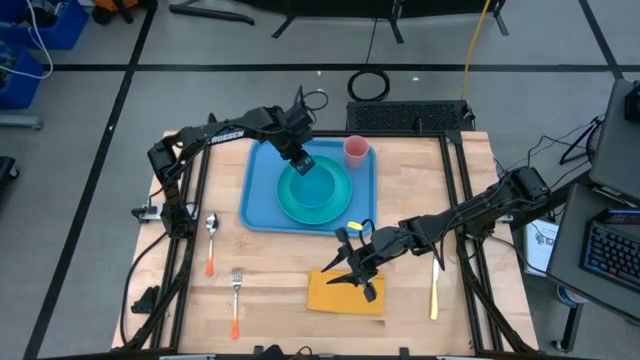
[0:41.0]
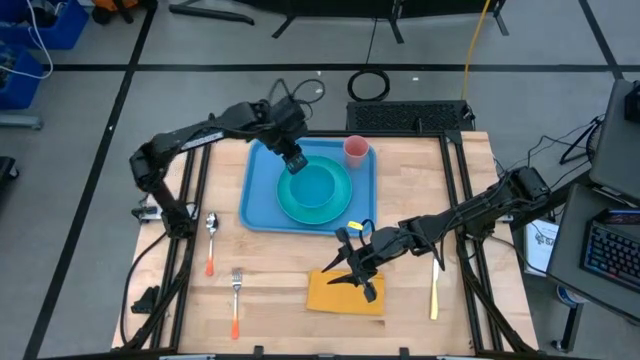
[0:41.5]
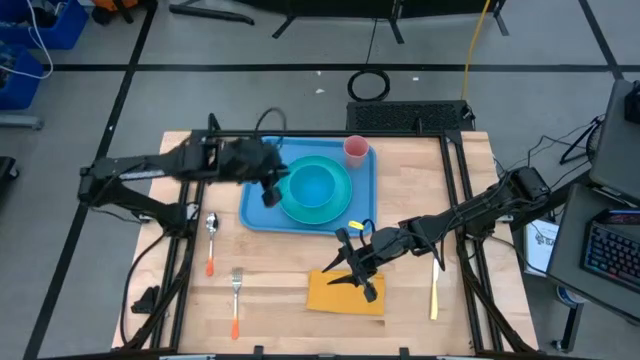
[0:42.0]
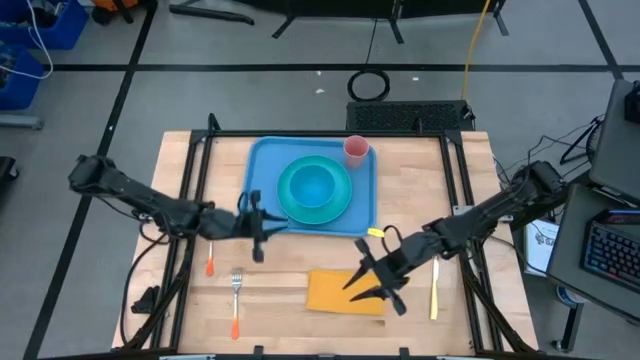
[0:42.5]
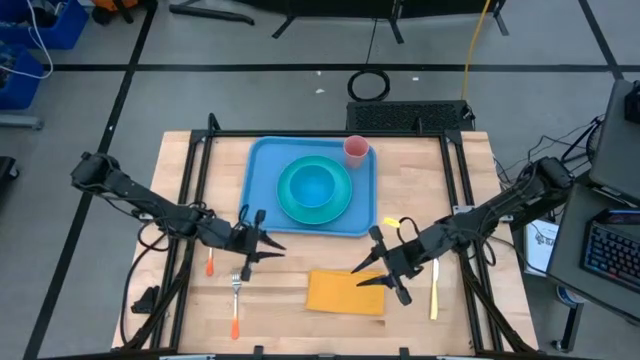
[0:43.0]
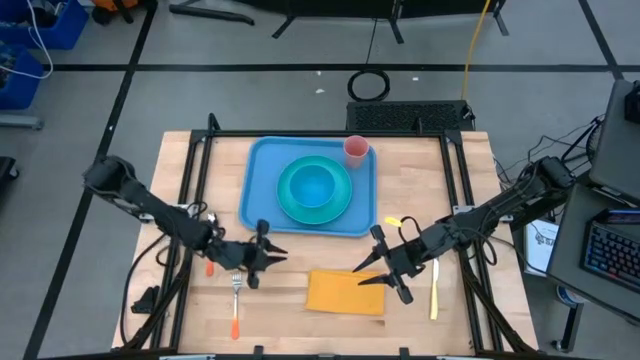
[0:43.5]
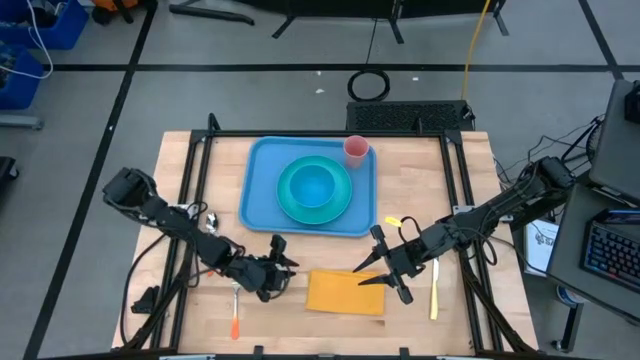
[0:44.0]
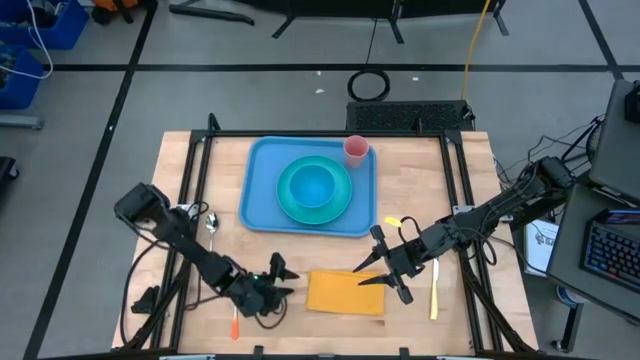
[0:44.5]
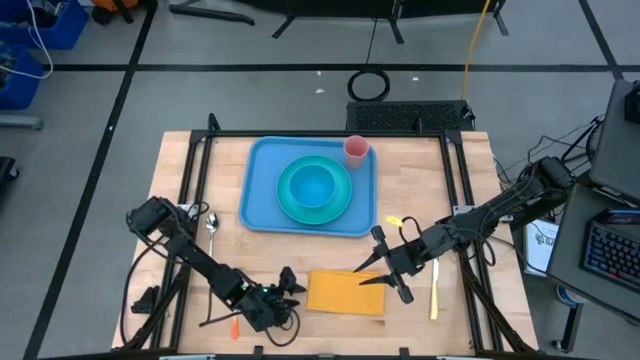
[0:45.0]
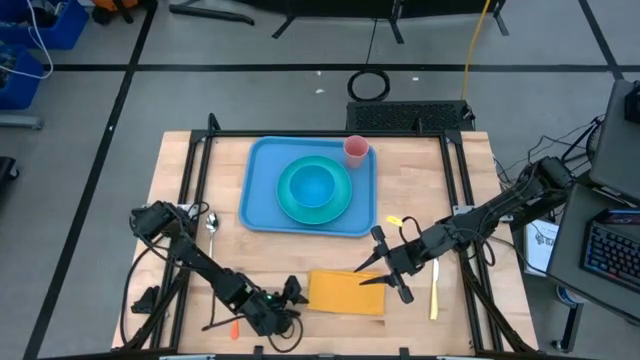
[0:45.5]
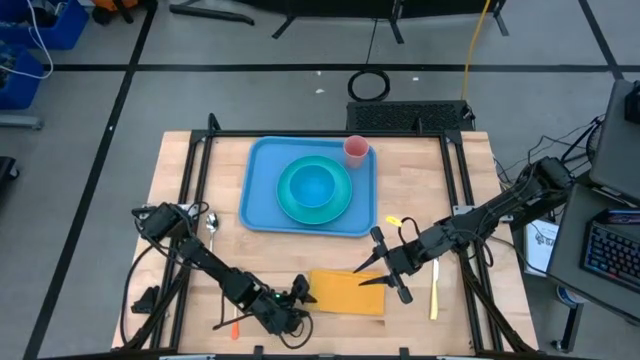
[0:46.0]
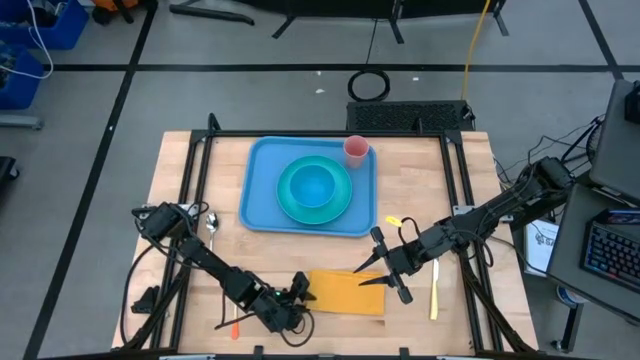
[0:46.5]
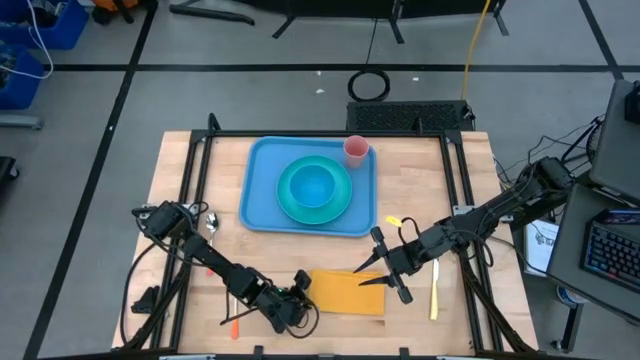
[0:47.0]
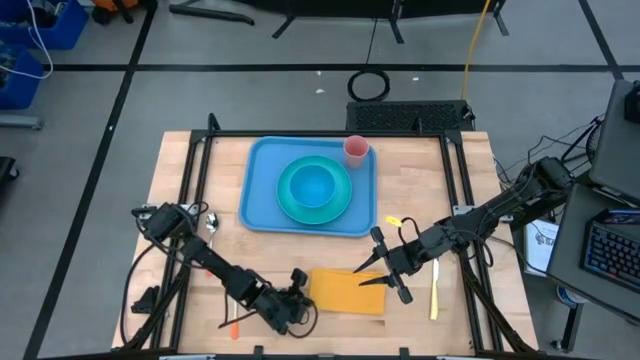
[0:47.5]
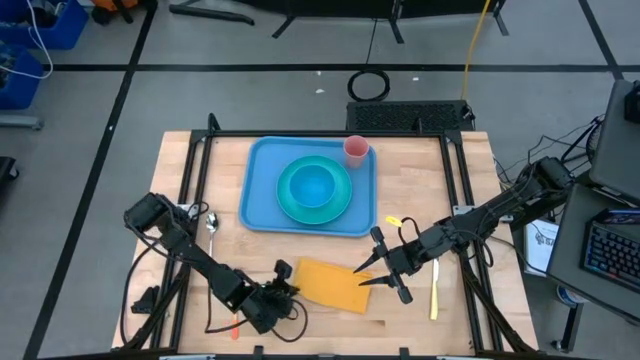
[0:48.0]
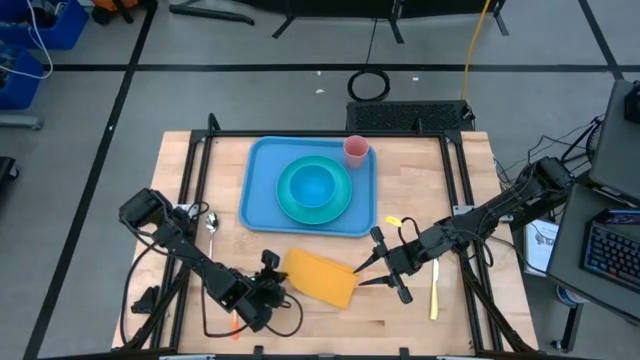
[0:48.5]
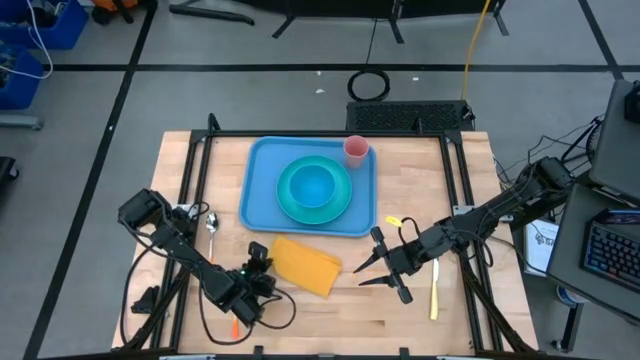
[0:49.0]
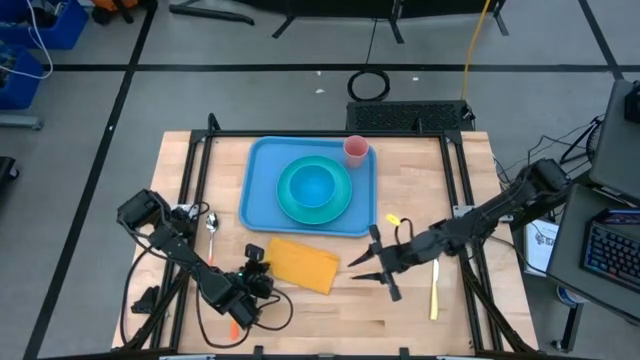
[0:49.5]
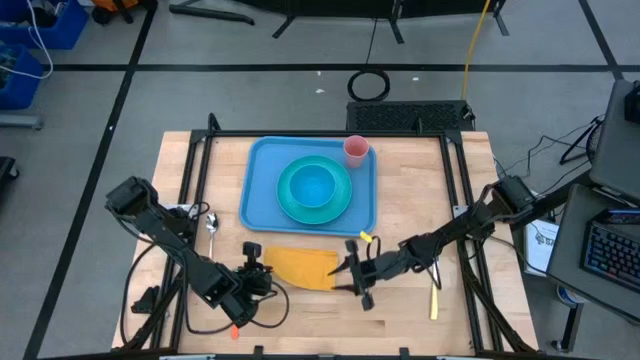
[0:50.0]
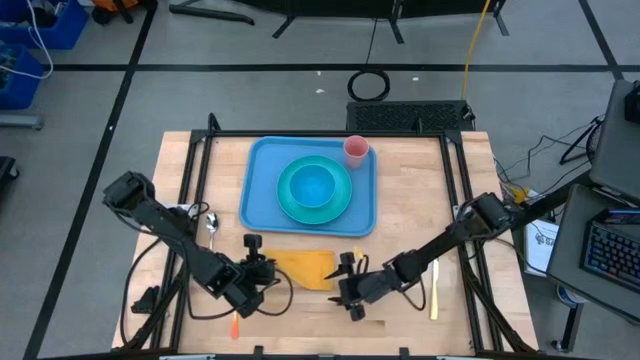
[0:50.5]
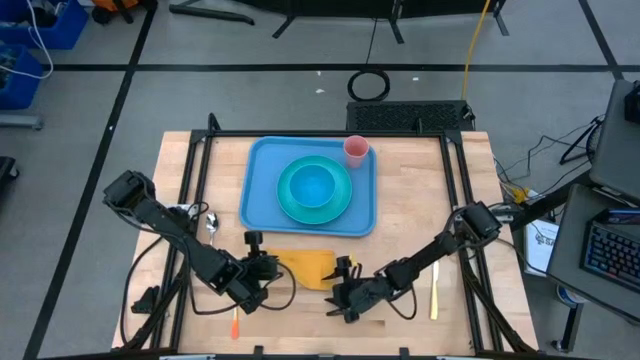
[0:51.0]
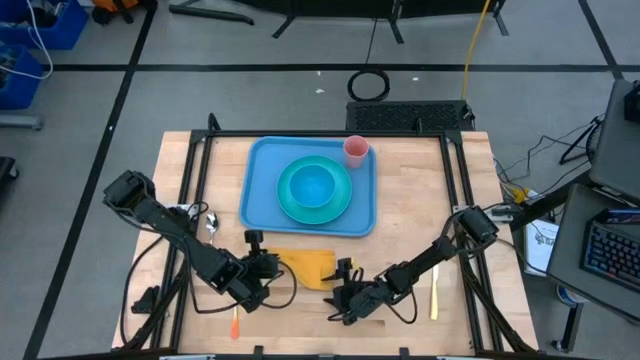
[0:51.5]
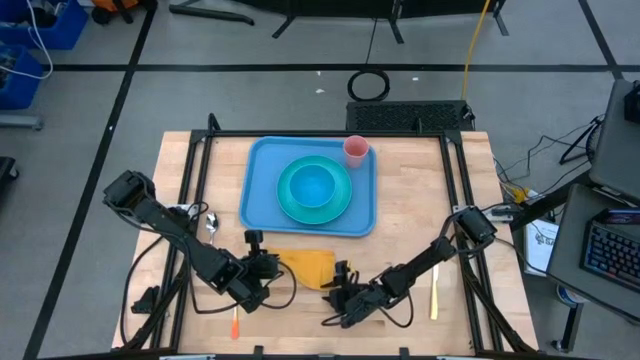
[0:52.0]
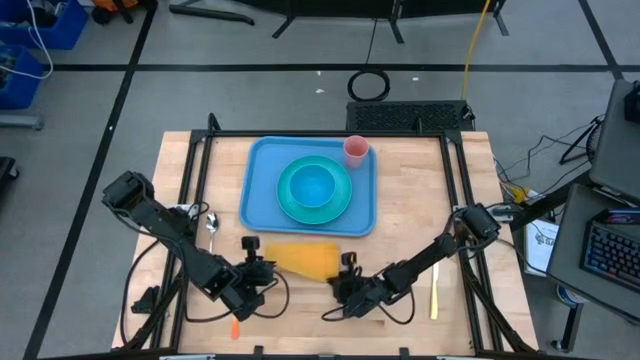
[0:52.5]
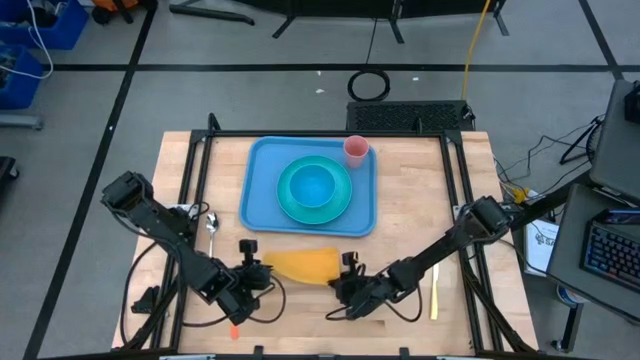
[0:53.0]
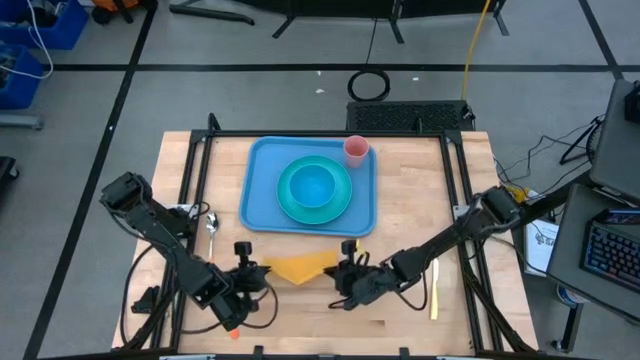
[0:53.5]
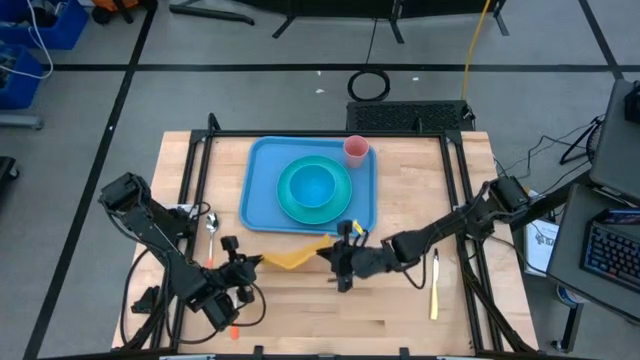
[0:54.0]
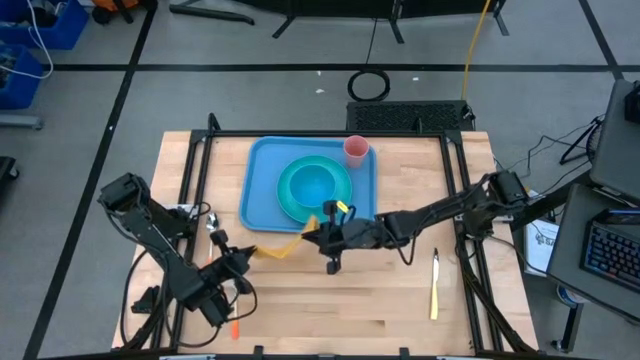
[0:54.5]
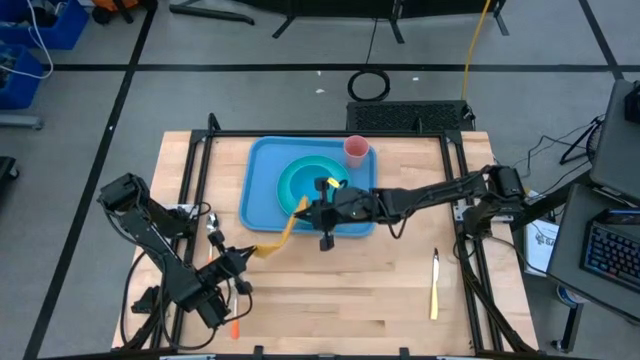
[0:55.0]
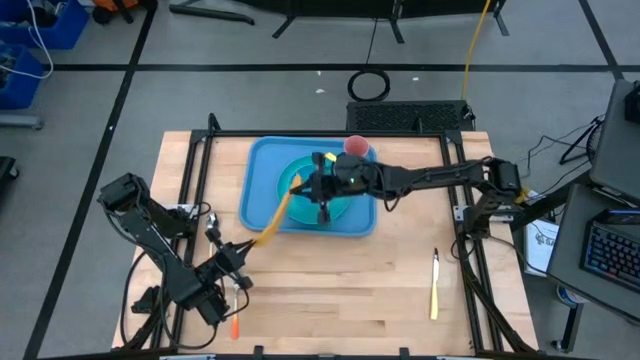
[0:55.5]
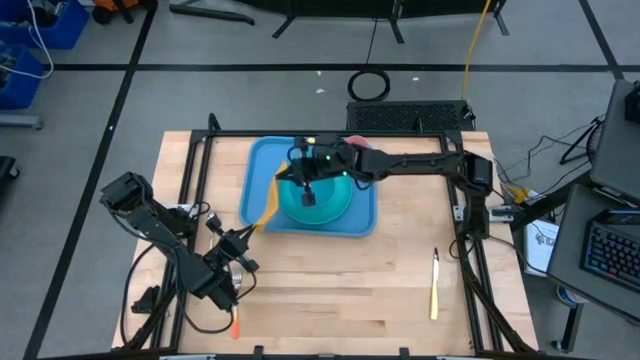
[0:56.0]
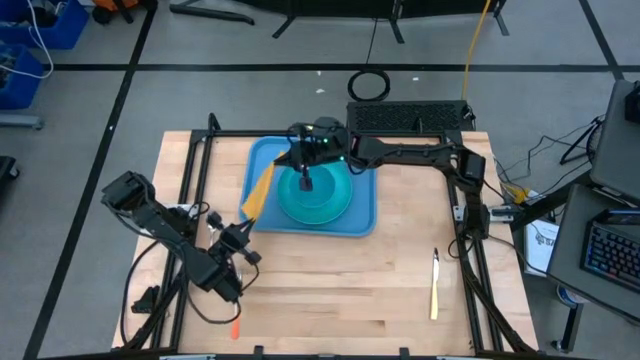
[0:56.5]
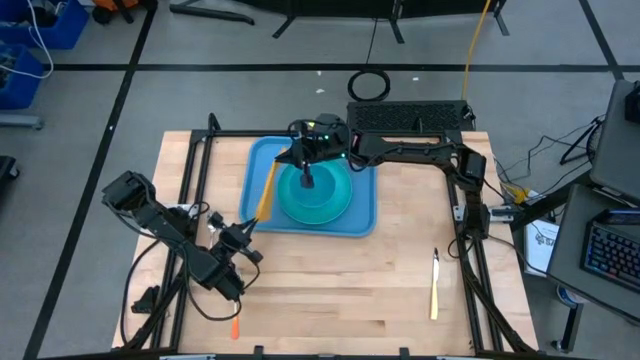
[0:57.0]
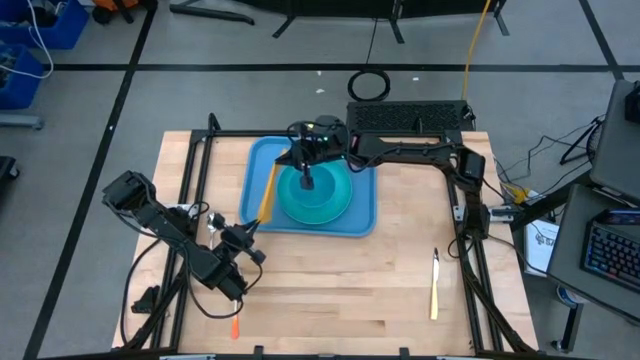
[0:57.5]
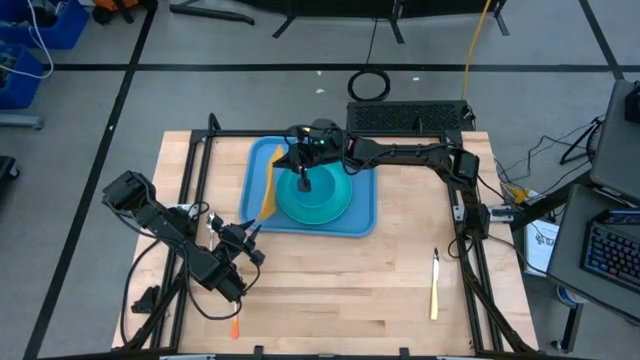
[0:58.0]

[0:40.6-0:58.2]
Task: Set up tray
Put the yellow napkin on the blue serving tray to the left of the green plate

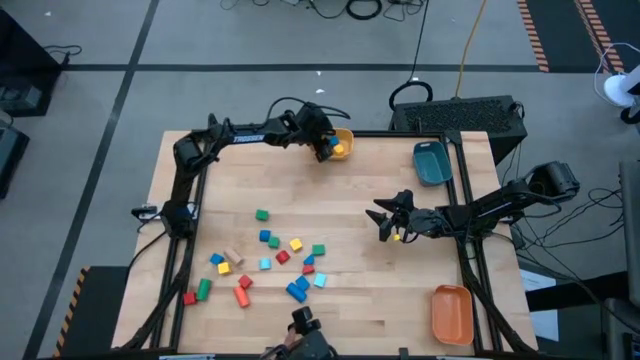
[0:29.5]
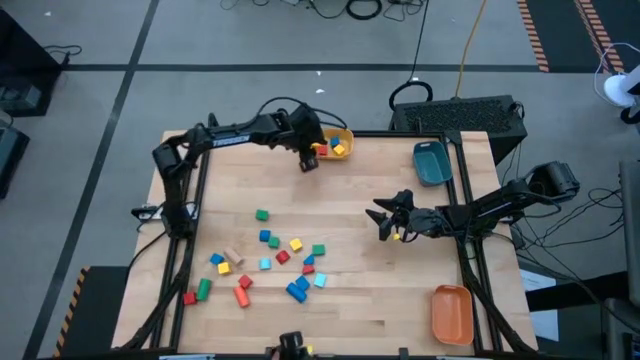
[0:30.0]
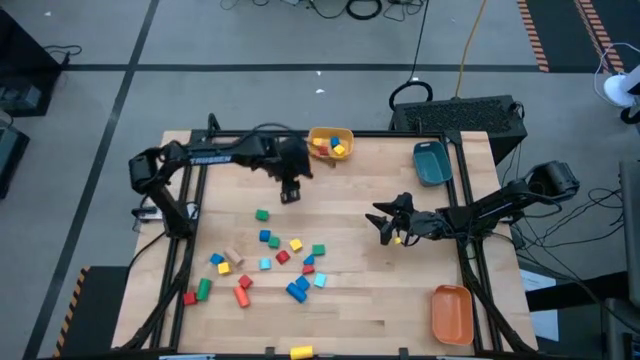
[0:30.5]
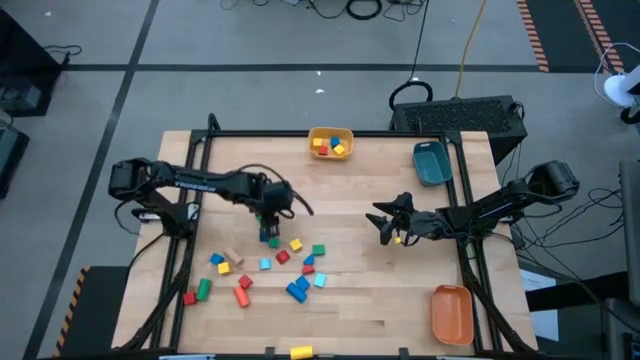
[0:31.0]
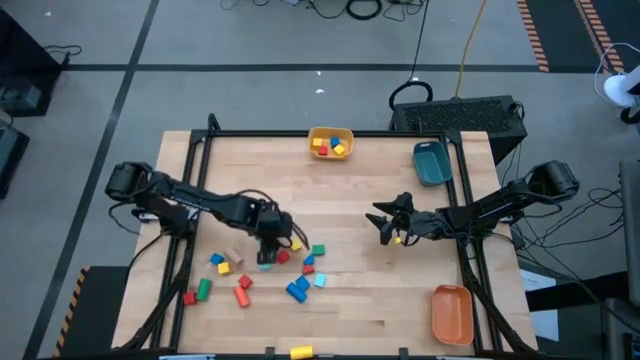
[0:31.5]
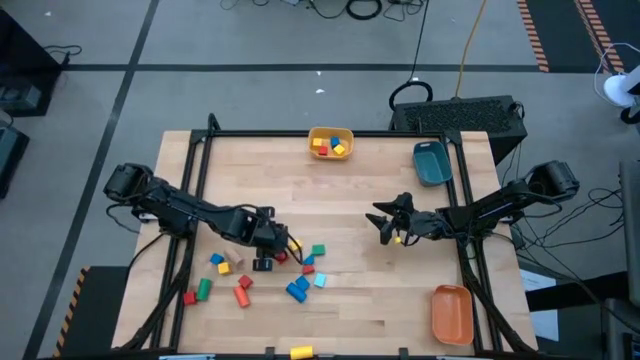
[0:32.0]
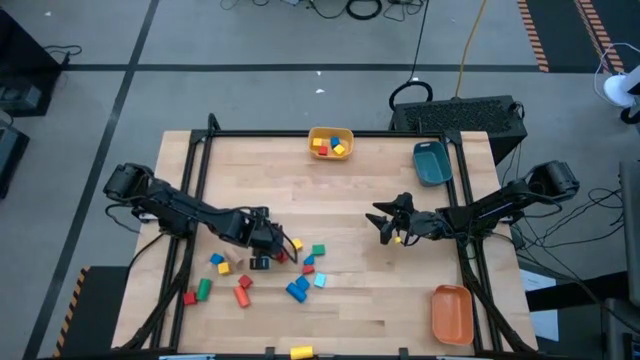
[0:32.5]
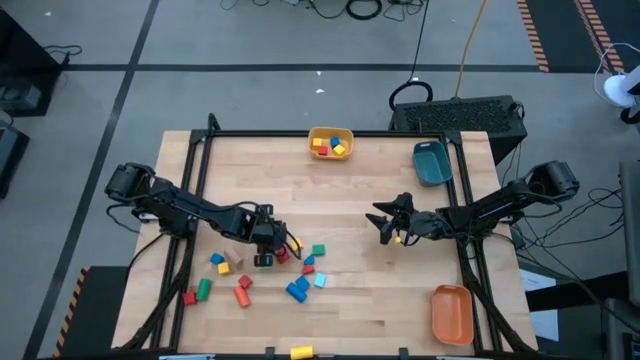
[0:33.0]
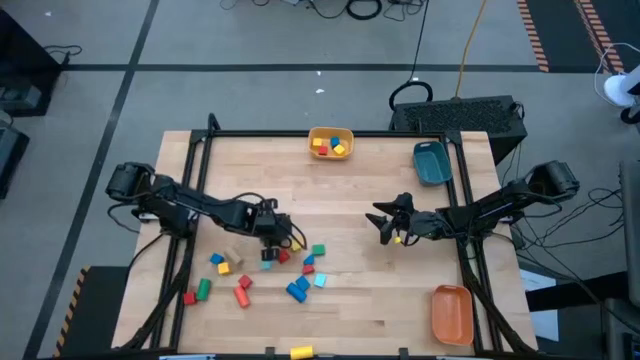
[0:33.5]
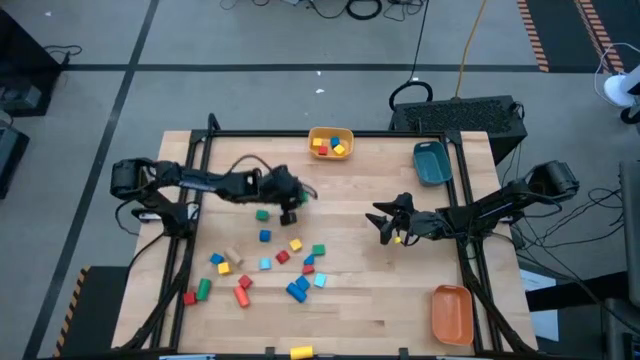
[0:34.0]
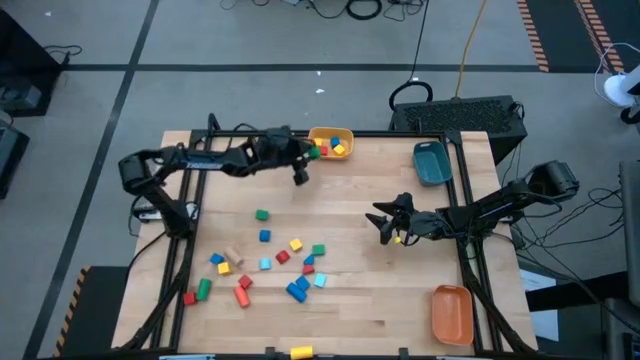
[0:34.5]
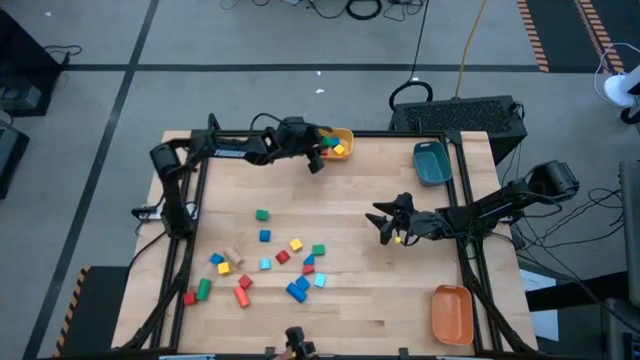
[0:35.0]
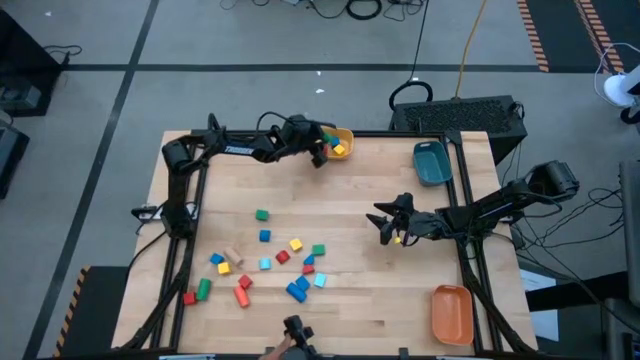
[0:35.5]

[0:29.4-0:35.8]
Task: Sort blocks by size
Put the green square block into the yellow bin
